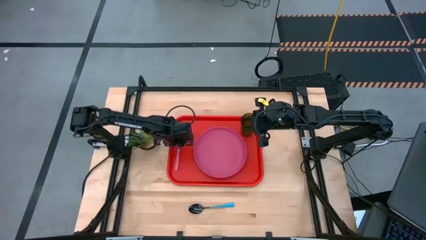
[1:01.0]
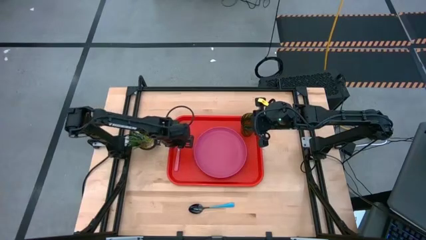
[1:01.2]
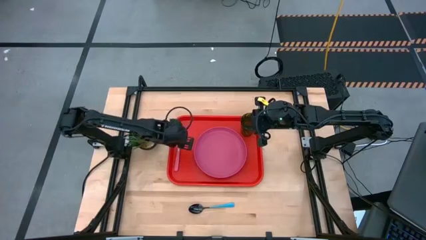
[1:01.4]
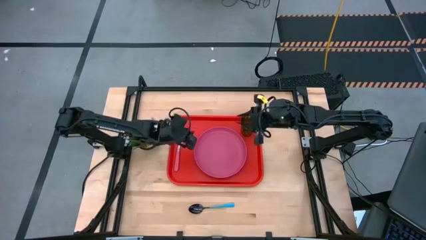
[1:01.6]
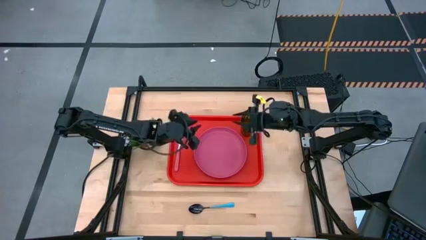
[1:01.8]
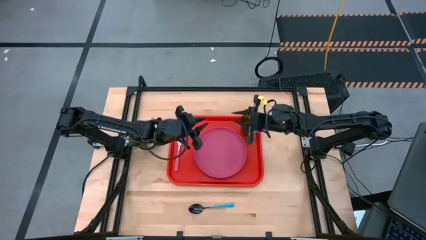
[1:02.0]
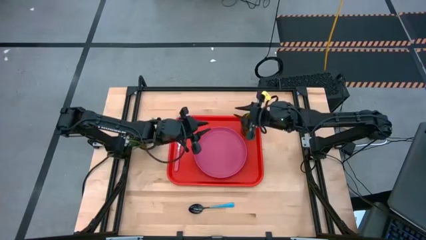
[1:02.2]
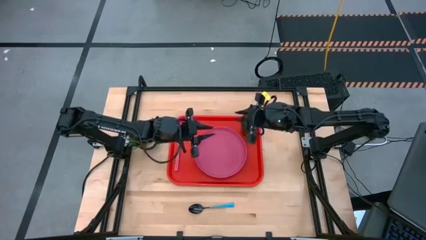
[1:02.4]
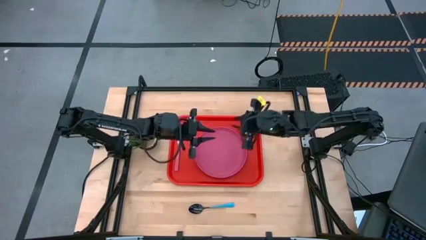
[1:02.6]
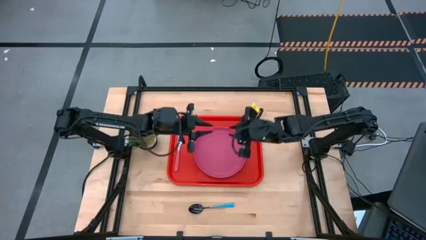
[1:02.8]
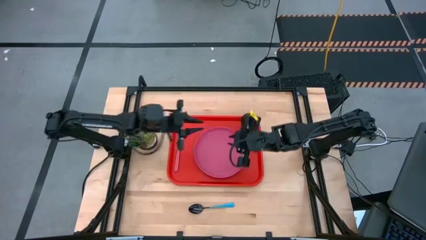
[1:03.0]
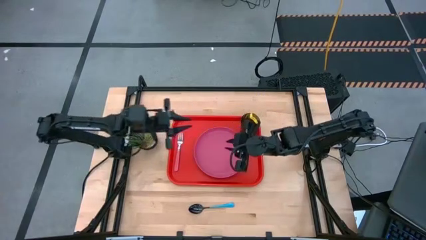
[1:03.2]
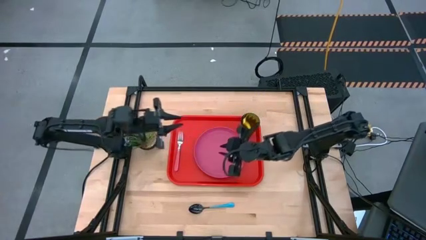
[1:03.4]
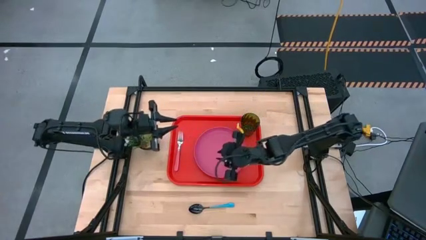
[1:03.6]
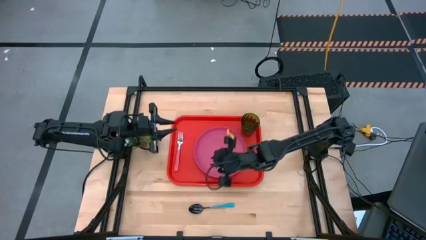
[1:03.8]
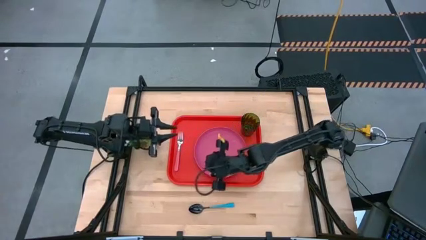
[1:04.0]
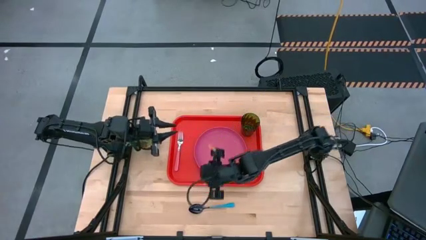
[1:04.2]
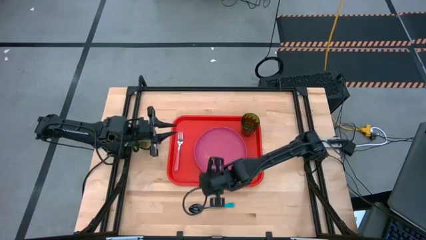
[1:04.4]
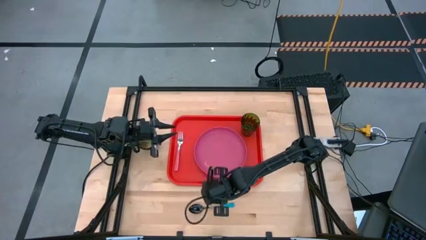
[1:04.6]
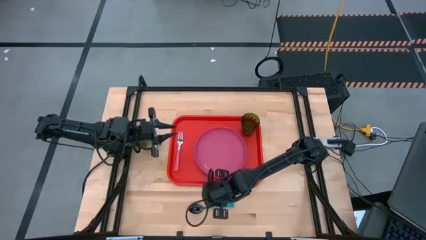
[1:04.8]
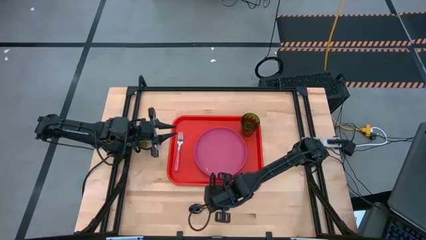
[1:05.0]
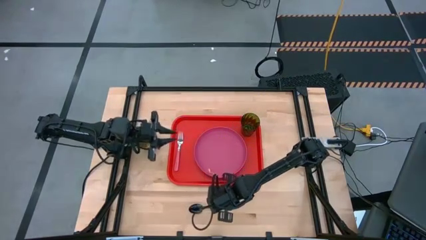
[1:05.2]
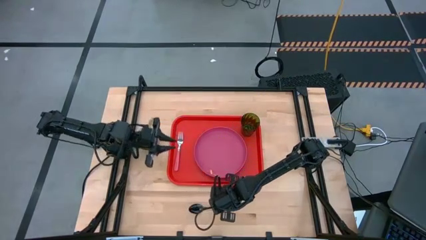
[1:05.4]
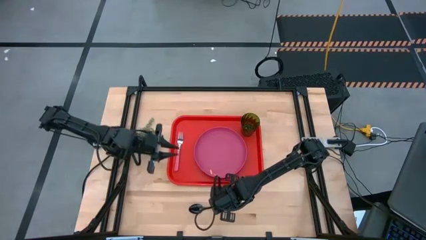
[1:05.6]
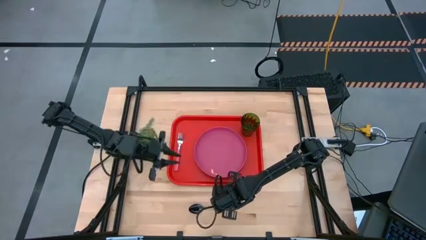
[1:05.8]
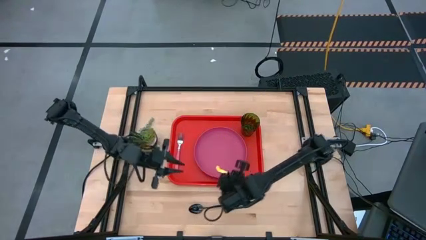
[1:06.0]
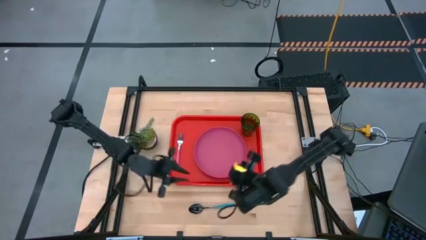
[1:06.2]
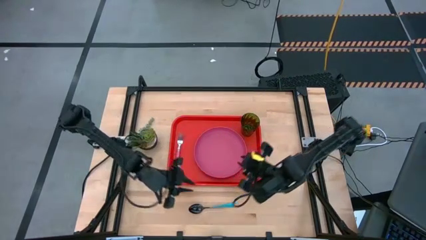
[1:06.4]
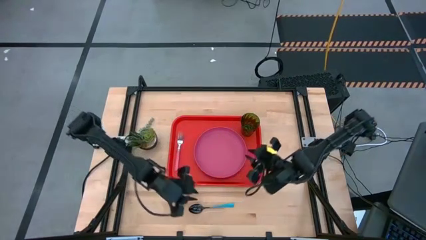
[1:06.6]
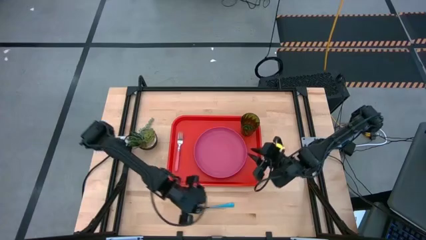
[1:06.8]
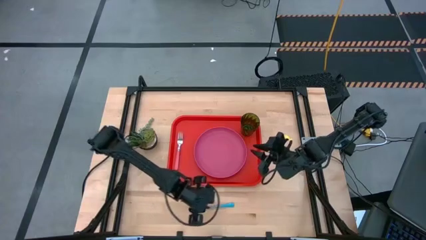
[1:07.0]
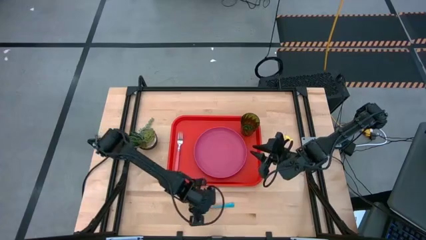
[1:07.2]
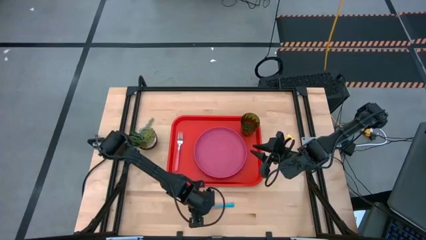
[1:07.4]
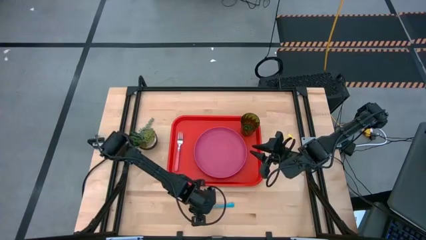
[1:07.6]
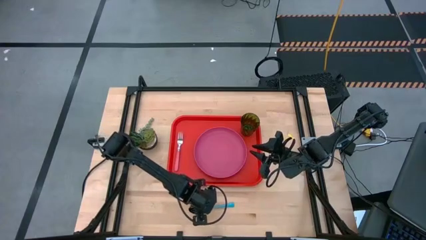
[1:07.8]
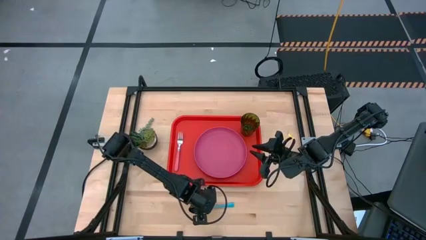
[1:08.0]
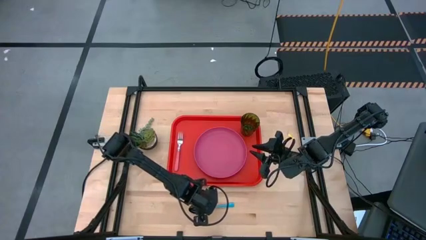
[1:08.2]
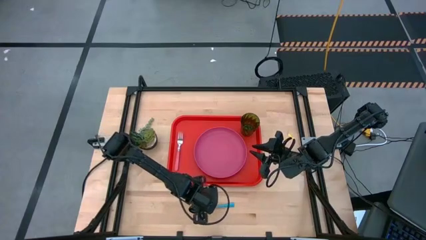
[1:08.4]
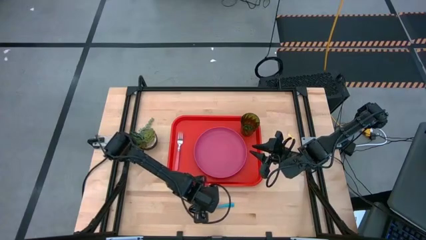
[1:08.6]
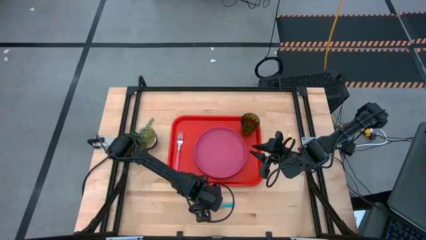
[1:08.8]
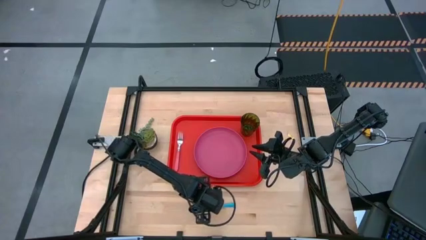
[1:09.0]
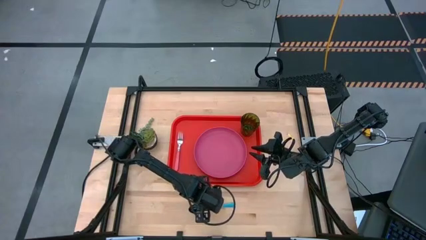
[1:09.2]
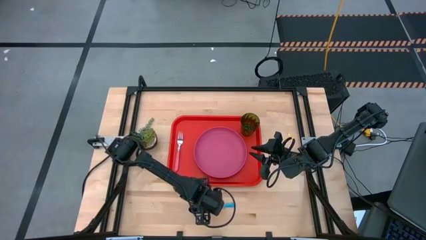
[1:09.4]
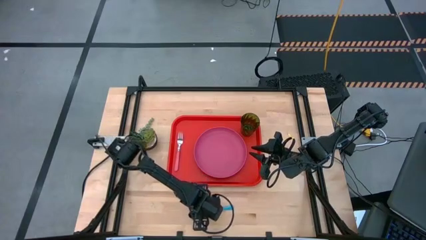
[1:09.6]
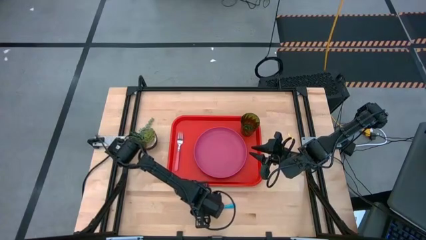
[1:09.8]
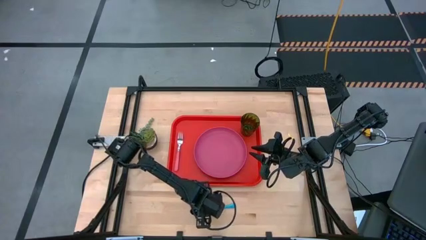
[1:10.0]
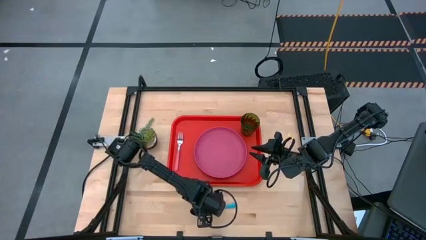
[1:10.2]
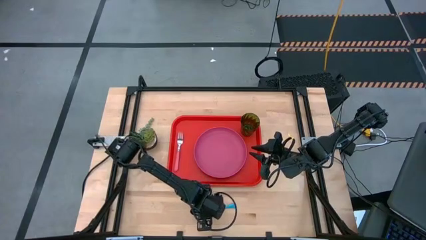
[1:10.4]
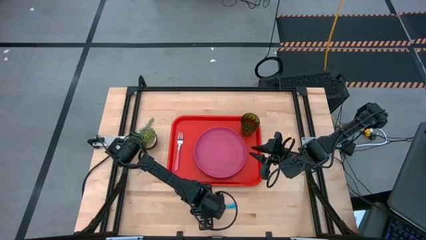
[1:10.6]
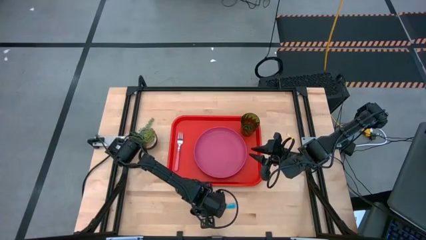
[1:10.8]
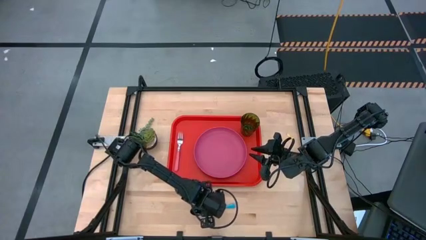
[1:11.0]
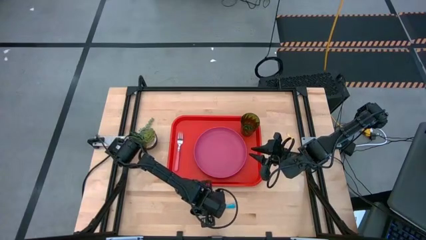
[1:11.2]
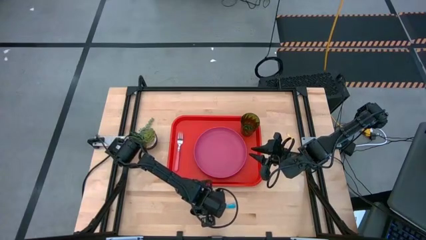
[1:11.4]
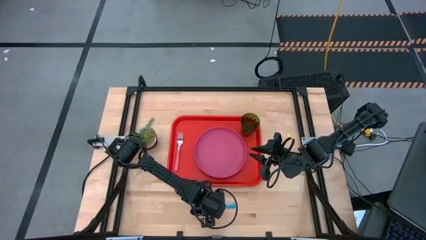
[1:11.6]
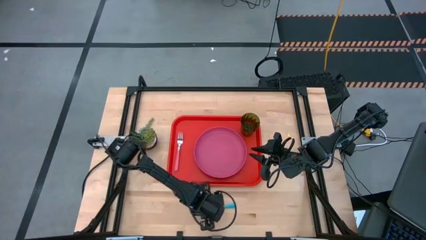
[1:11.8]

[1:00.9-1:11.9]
Task: Pick and place plate/cup/fork/spoon on tray
Put the blue spoon on the red tray to the right of the pink fork

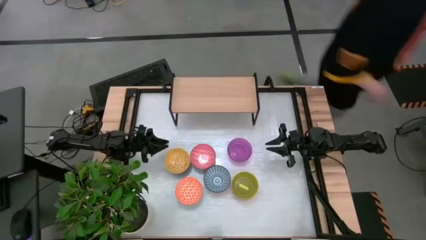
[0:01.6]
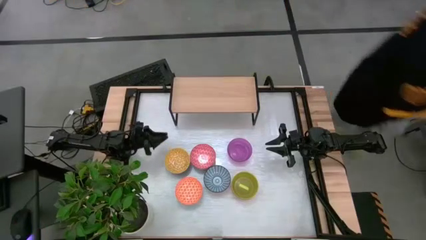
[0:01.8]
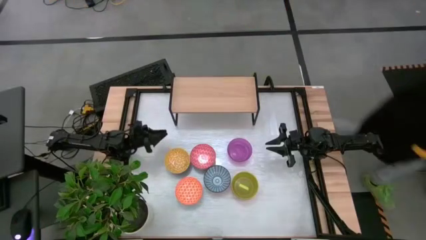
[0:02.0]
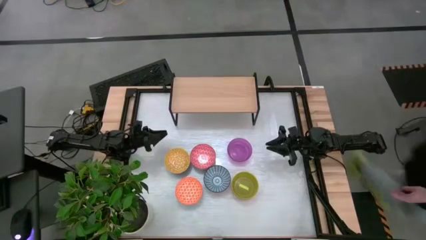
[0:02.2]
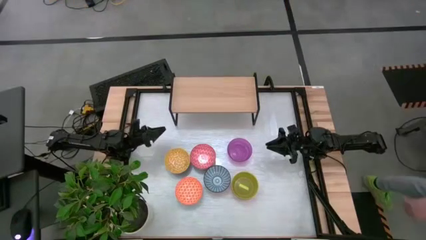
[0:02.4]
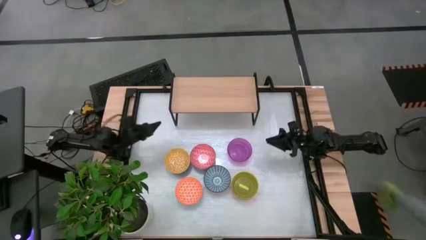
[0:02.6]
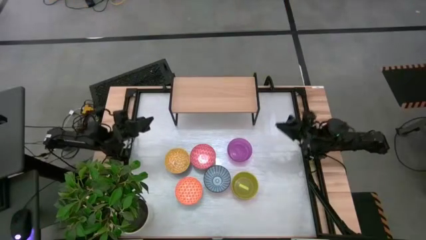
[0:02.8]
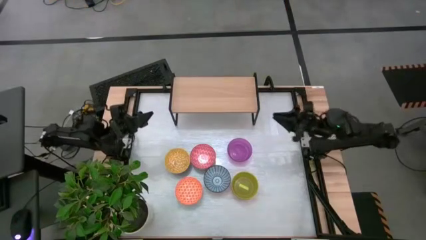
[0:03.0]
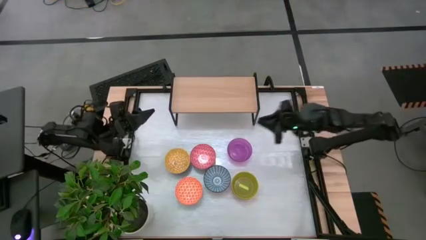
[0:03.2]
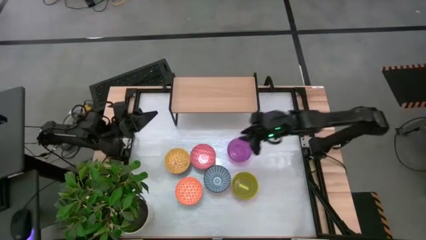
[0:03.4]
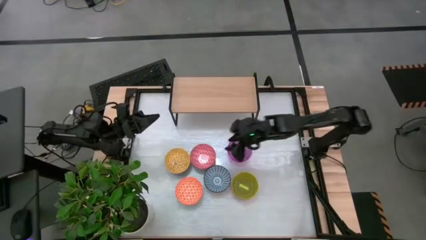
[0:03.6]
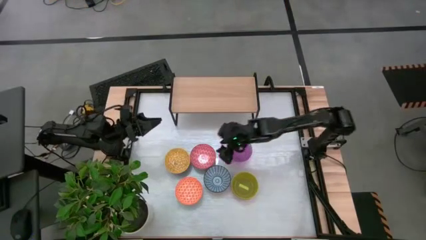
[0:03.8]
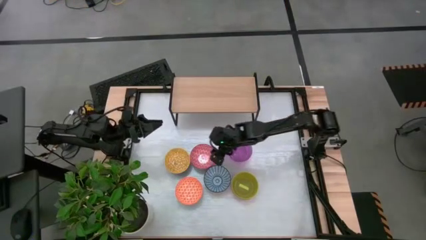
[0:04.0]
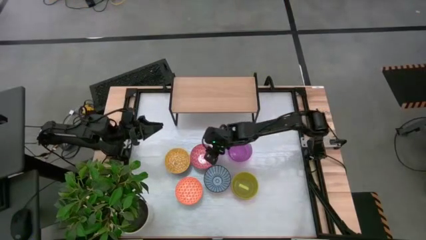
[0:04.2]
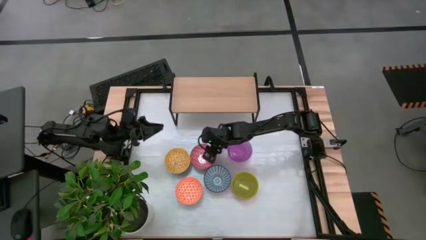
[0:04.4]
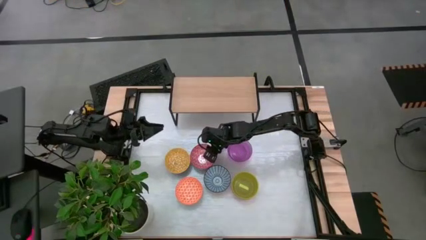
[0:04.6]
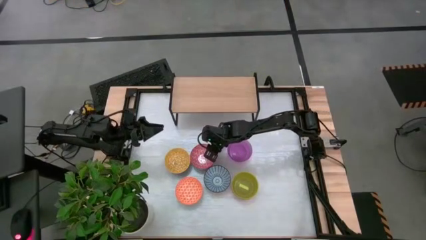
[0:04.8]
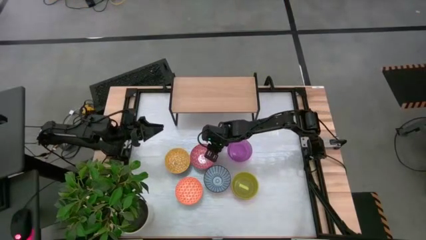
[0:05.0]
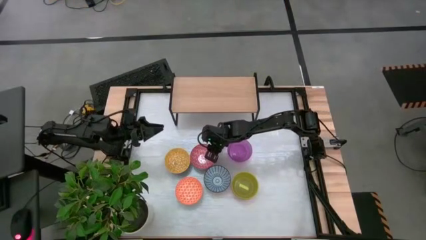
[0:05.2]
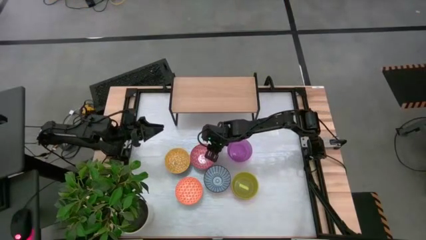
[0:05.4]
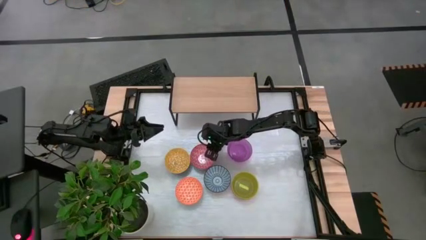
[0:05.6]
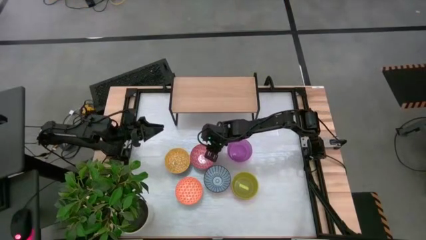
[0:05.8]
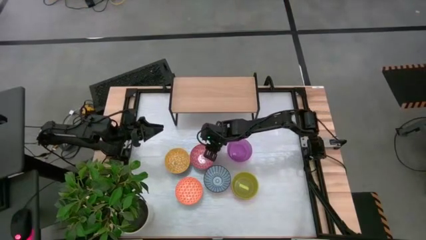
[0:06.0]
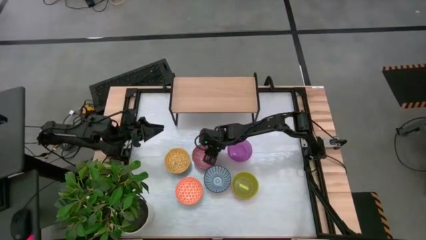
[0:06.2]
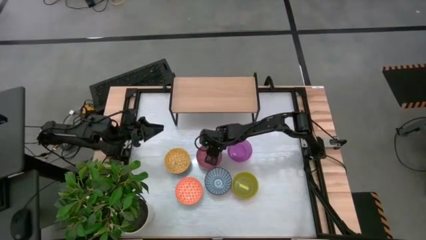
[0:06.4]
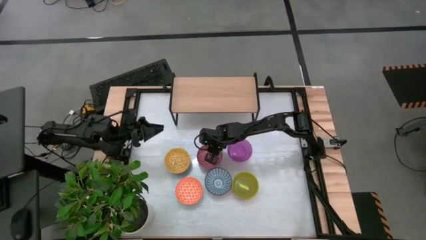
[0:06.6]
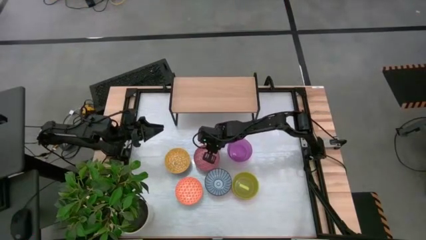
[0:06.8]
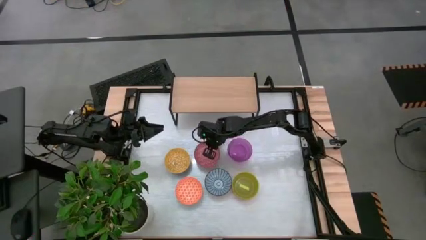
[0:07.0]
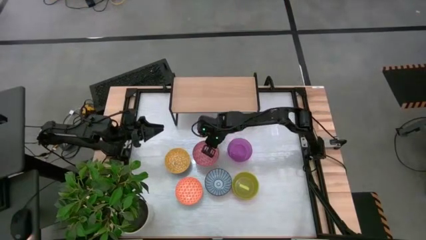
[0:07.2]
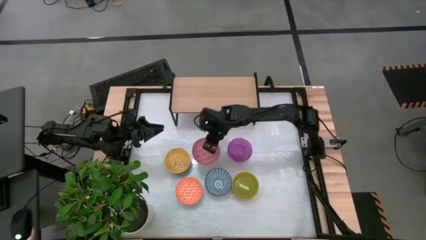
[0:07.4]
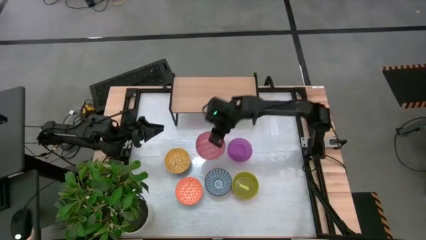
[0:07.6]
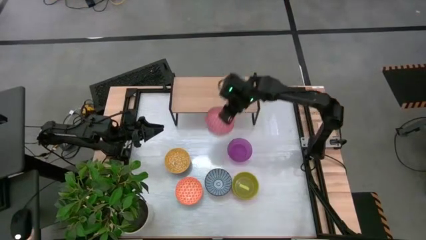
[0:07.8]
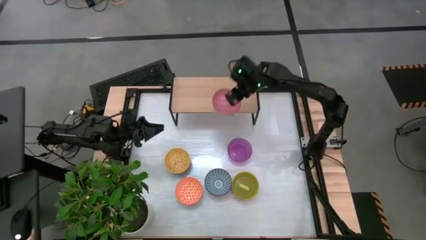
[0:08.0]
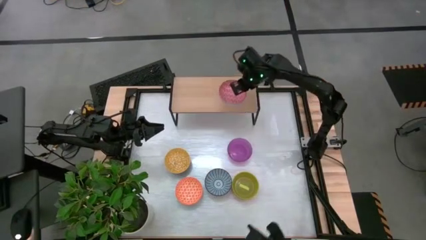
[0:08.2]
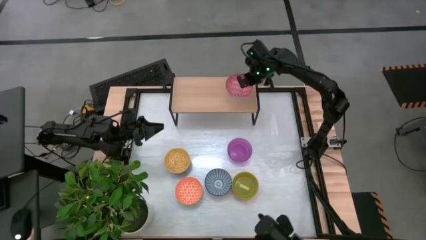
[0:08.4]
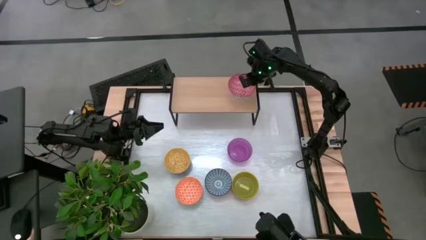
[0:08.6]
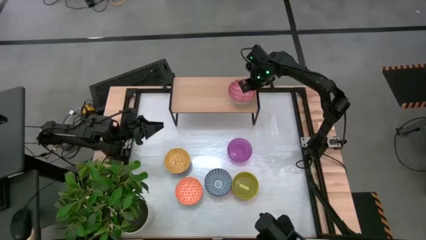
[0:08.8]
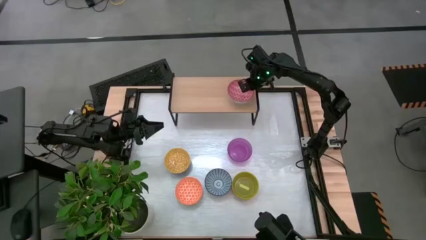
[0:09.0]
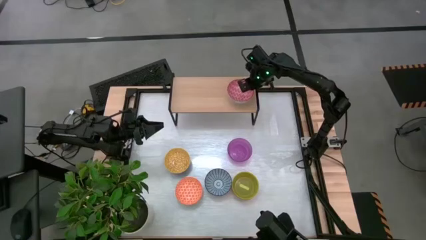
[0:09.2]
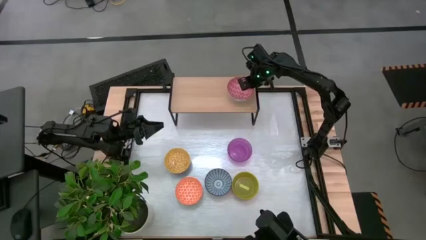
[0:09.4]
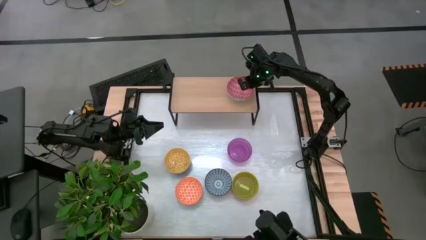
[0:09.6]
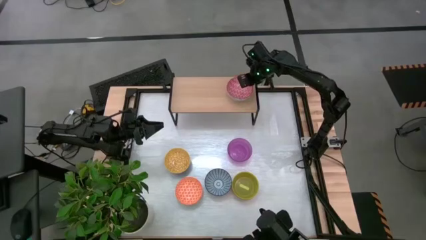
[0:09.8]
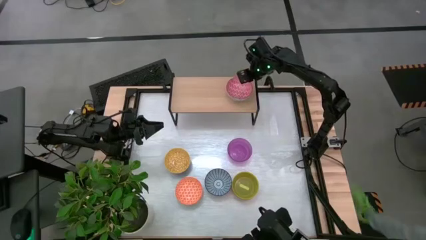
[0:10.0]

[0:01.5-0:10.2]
Task: Place and stack bowls onto a shelf
Put the red patterned bowl on the shelf
